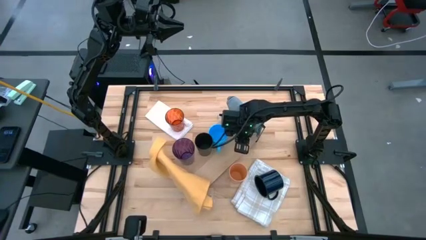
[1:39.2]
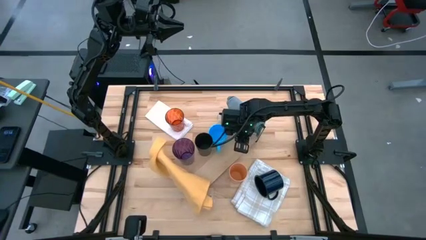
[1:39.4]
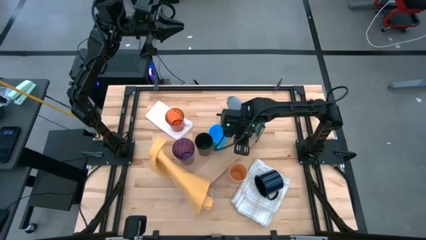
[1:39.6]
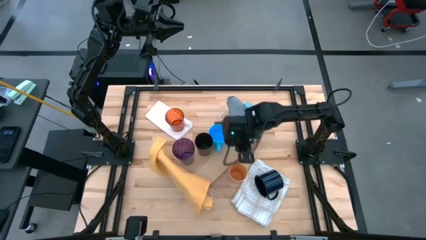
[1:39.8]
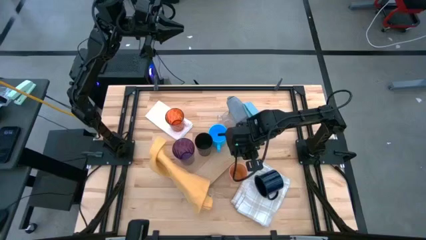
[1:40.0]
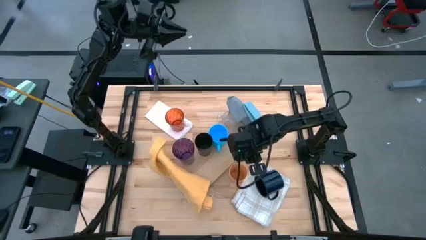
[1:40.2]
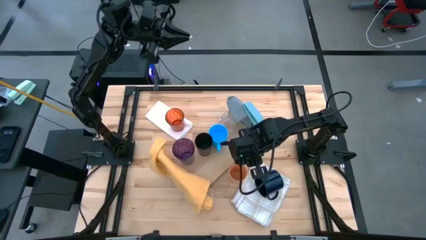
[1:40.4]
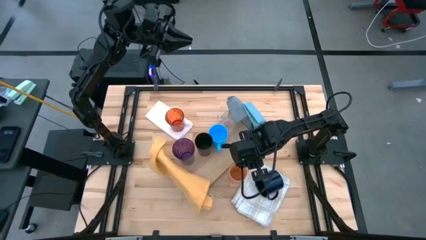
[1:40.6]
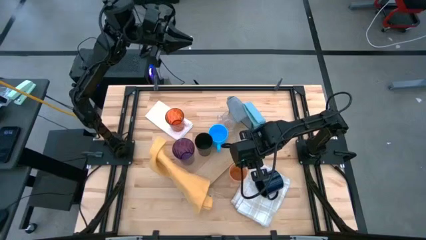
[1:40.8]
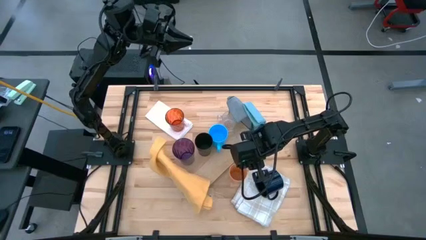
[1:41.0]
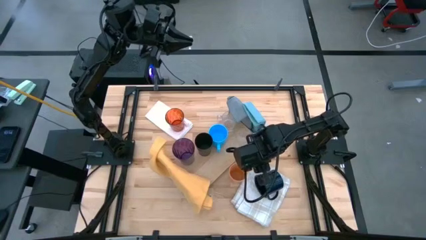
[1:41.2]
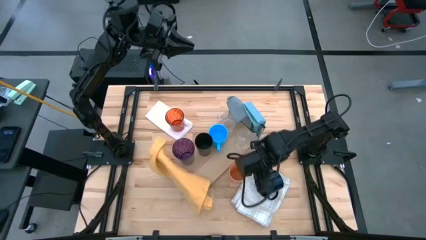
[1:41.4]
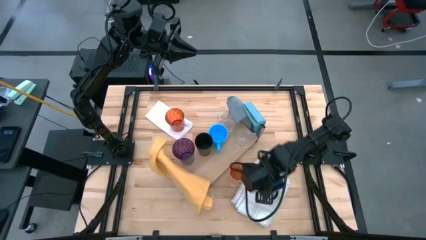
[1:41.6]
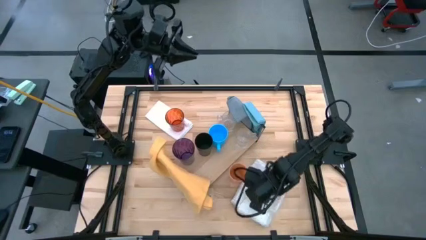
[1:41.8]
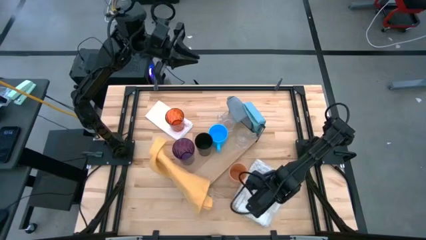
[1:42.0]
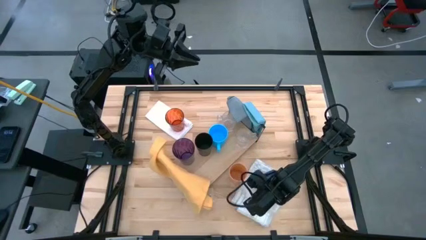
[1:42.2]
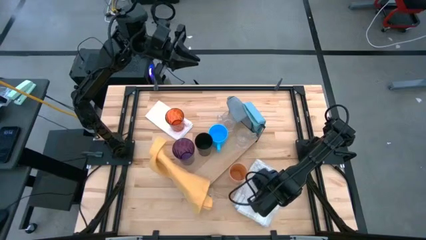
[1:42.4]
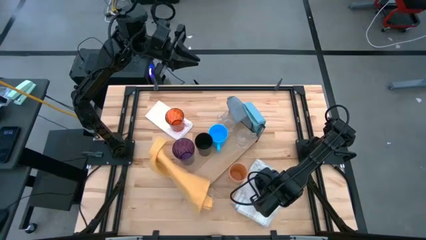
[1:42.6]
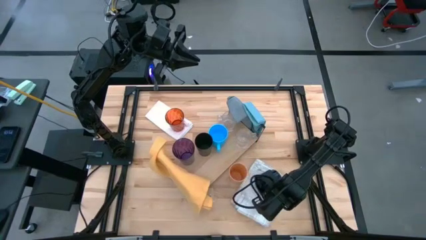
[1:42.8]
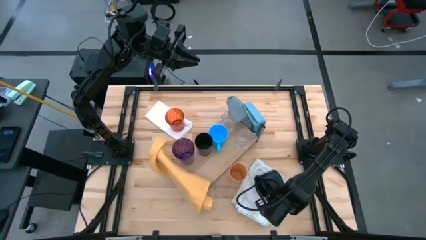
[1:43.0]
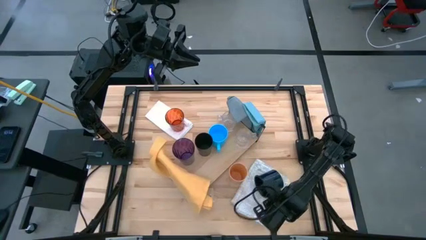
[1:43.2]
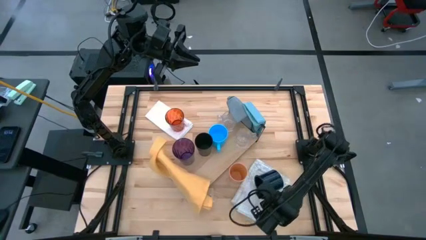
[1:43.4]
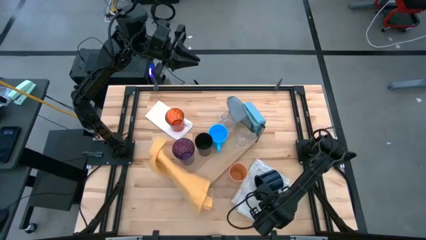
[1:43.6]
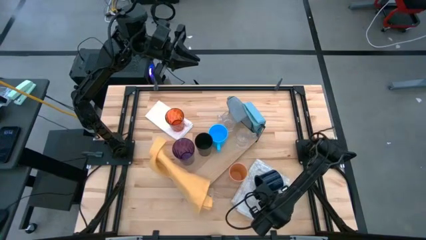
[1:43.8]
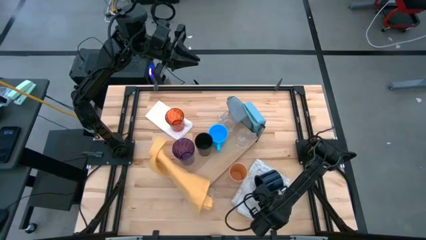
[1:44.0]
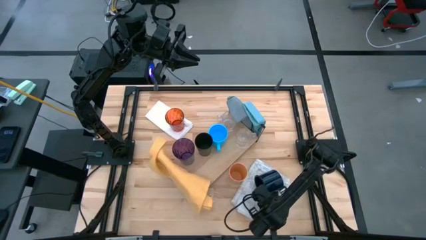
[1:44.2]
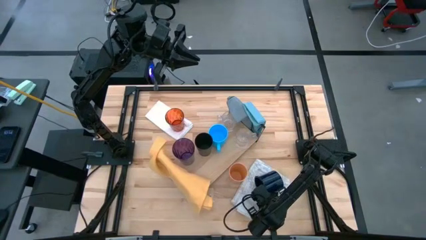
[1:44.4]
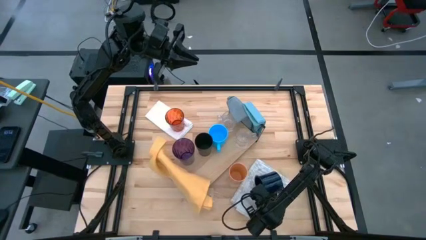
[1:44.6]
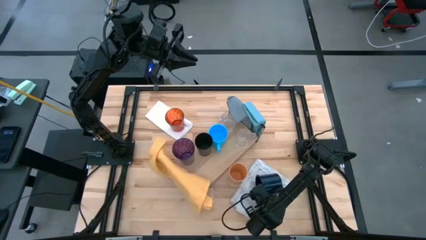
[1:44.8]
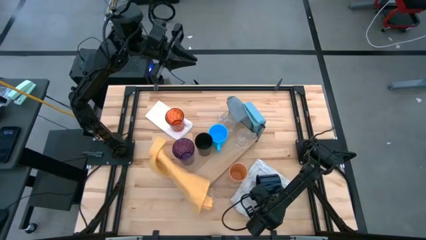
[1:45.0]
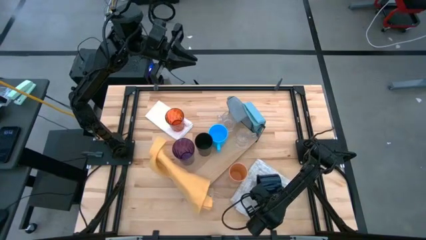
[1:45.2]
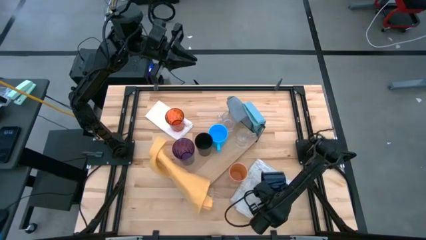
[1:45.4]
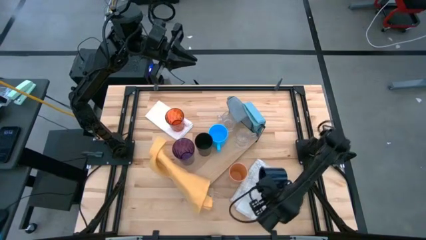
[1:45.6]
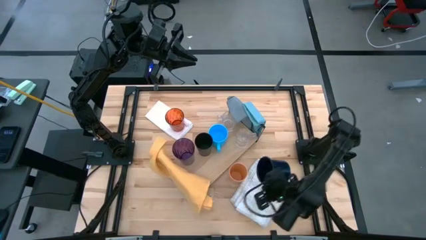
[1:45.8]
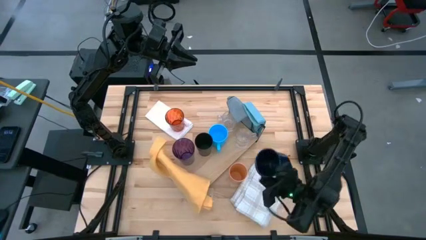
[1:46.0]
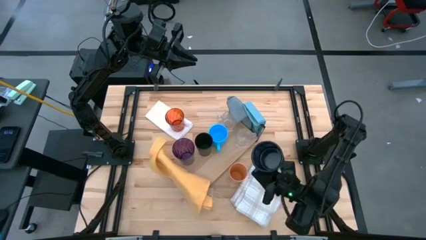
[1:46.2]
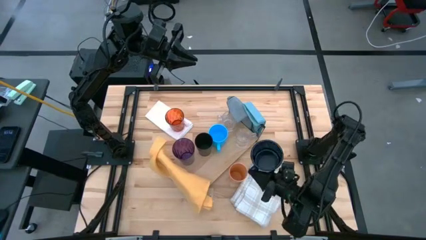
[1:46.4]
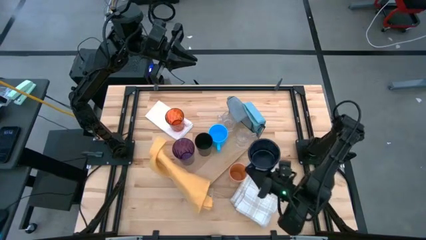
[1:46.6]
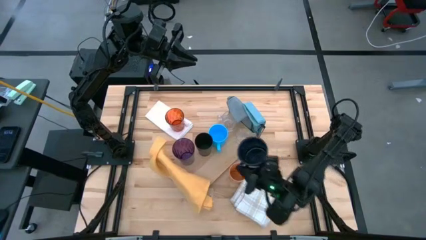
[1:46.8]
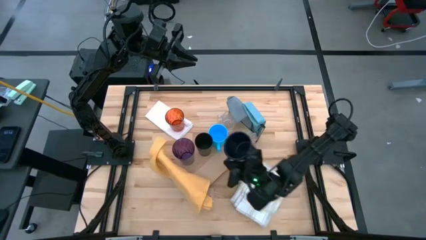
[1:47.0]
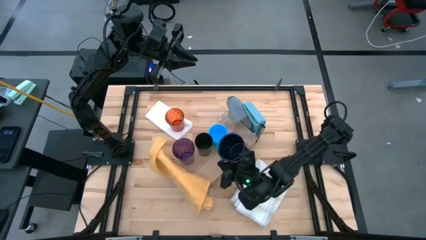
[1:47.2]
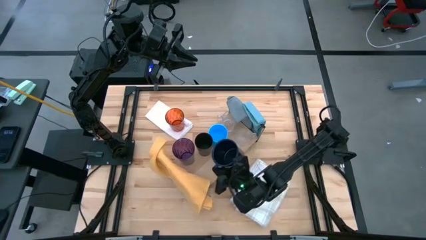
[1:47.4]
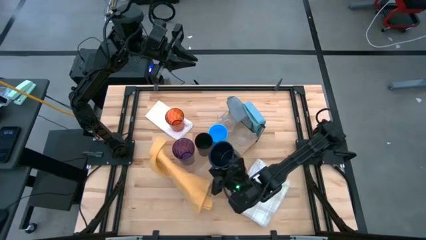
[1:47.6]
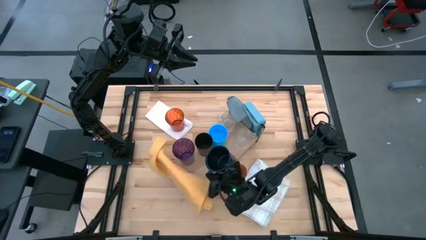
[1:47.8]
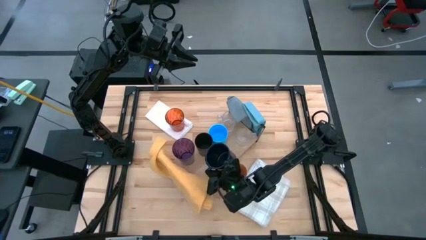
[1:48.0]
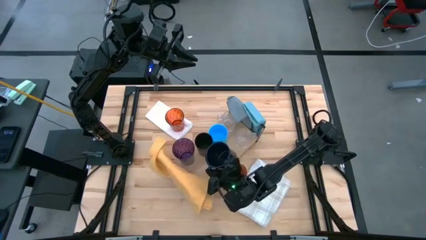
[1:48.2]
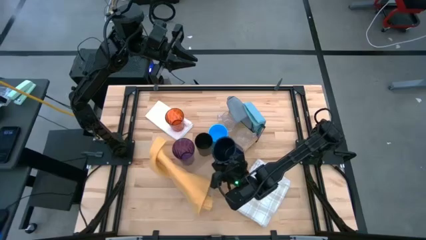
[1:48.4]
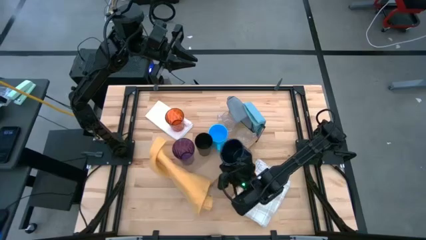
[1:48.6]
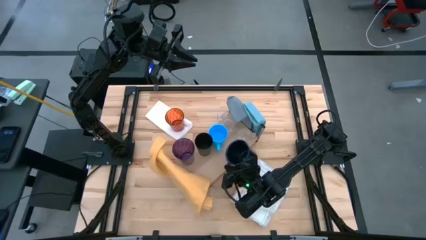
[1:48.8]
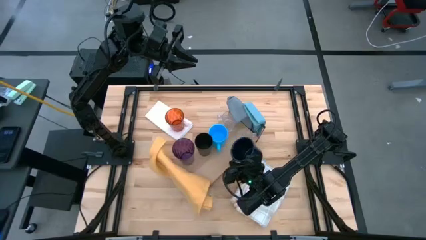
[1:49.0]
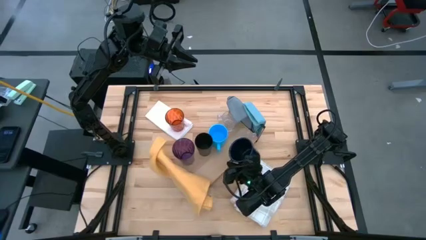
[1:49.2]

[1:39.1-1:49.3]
Task: Stack small to large cups/mugs on shelf
Put the dark blue mug on the shelf
